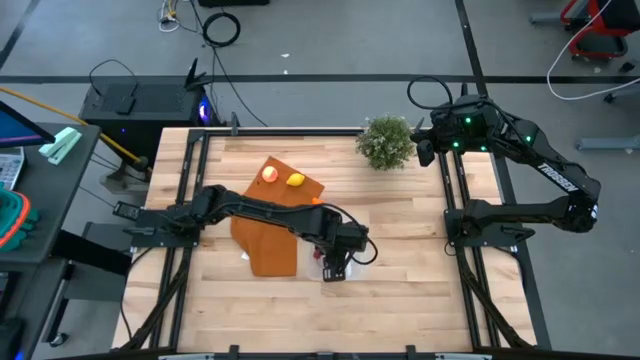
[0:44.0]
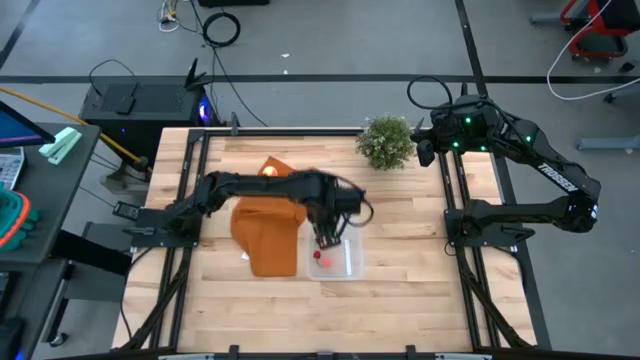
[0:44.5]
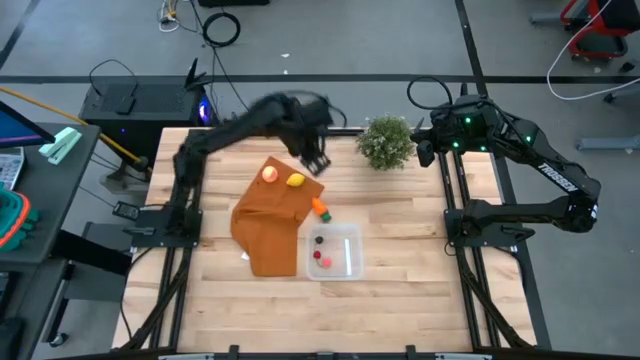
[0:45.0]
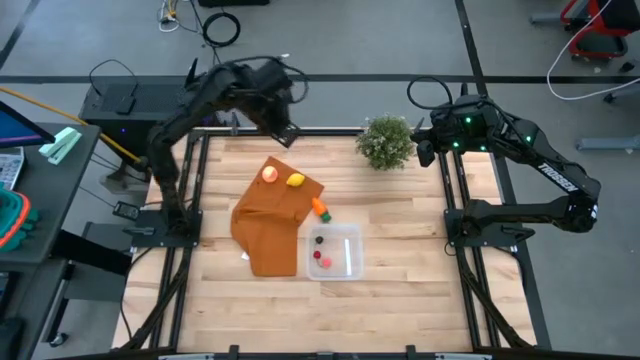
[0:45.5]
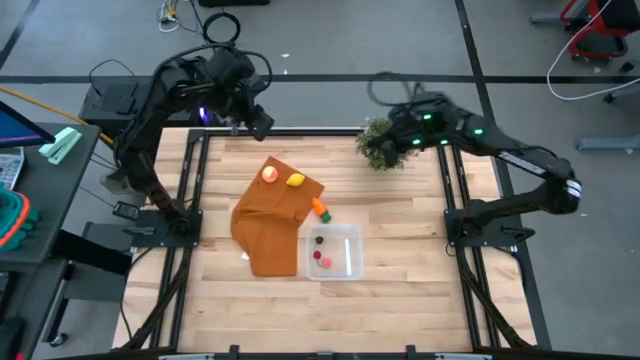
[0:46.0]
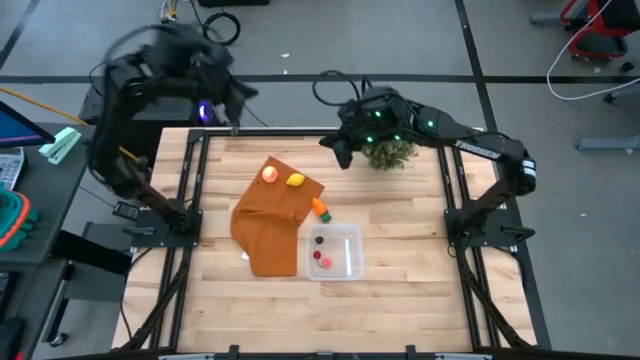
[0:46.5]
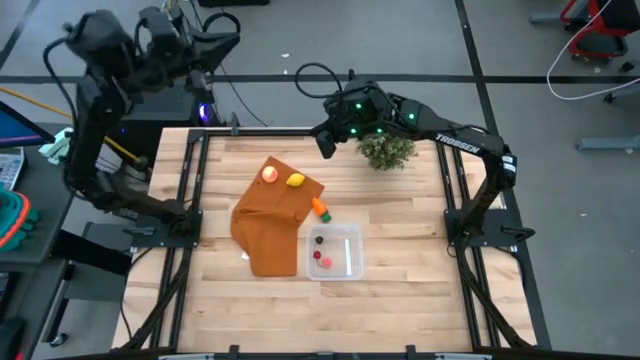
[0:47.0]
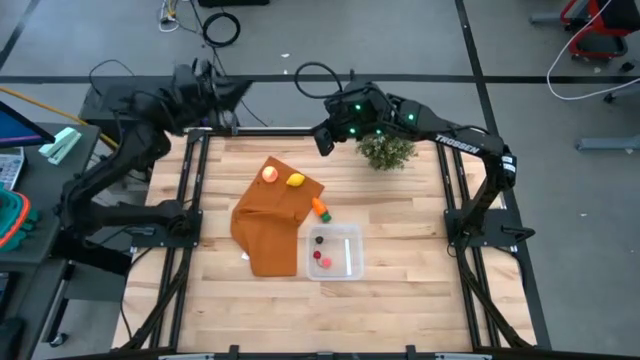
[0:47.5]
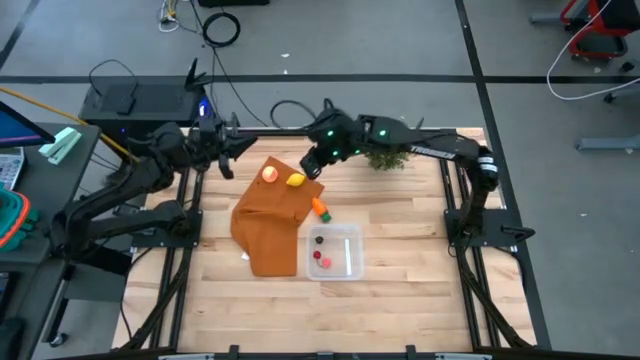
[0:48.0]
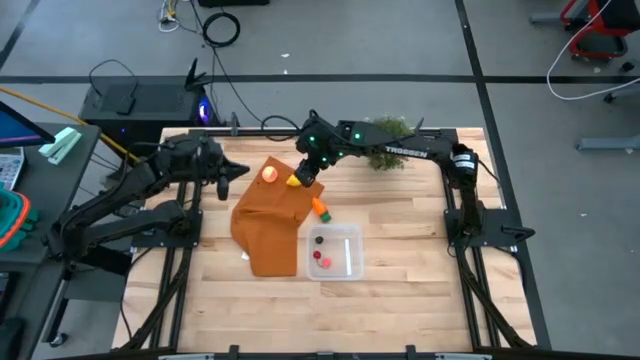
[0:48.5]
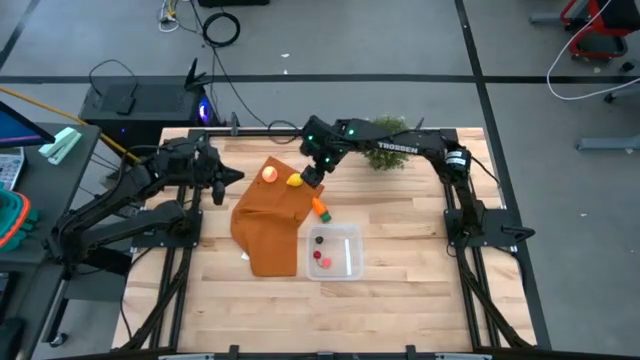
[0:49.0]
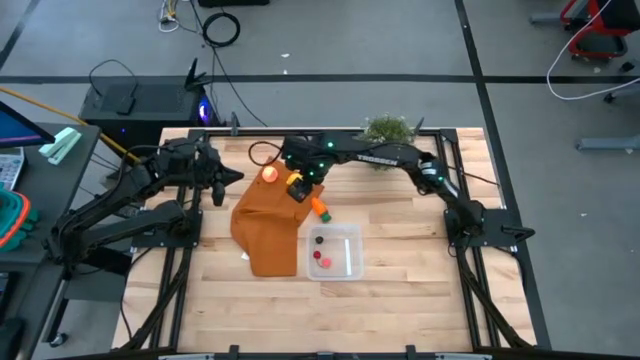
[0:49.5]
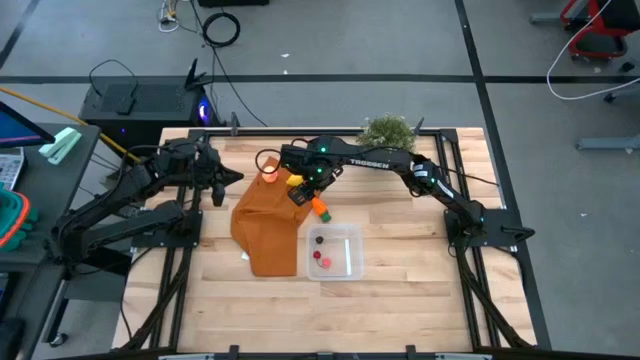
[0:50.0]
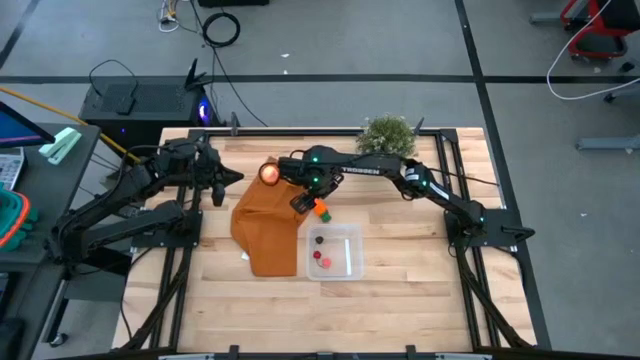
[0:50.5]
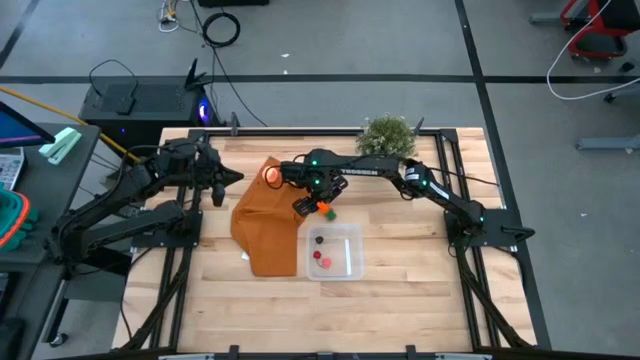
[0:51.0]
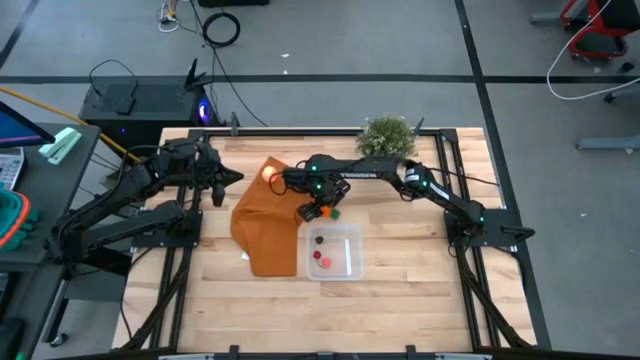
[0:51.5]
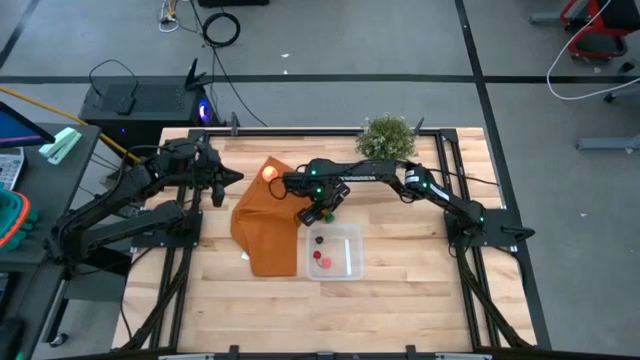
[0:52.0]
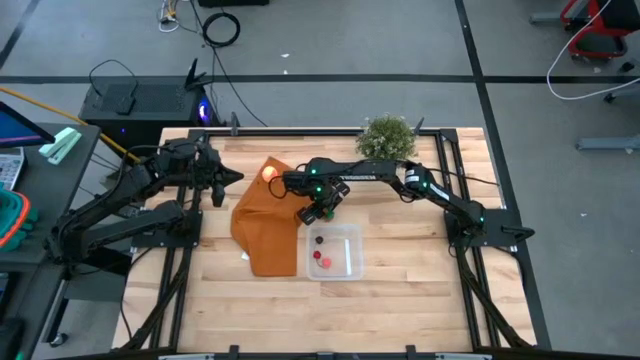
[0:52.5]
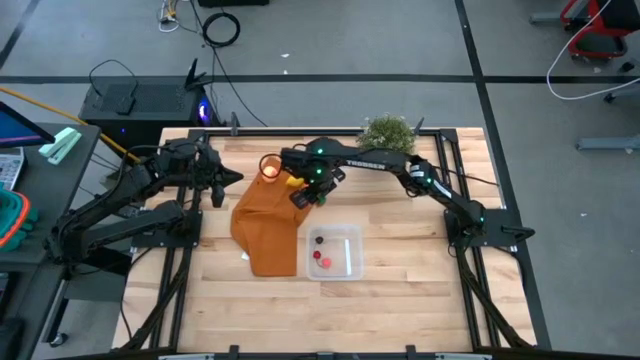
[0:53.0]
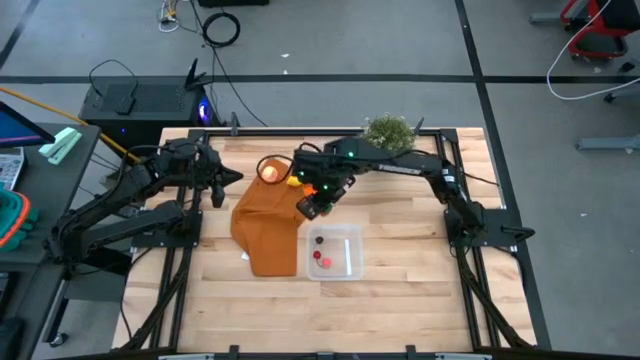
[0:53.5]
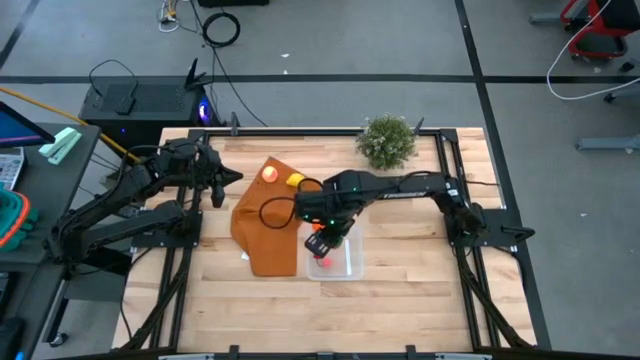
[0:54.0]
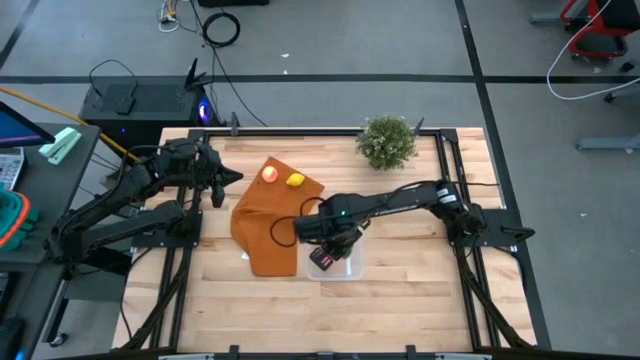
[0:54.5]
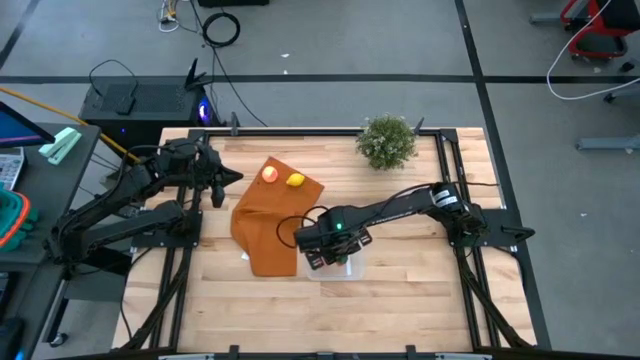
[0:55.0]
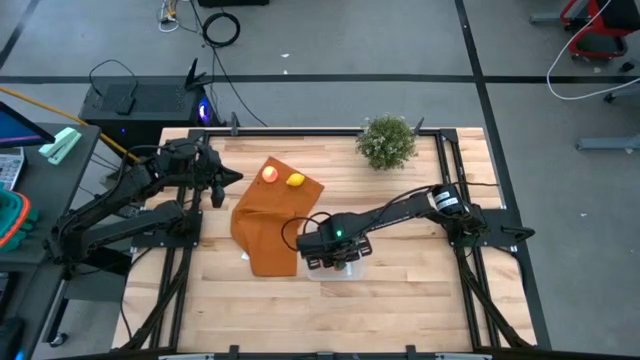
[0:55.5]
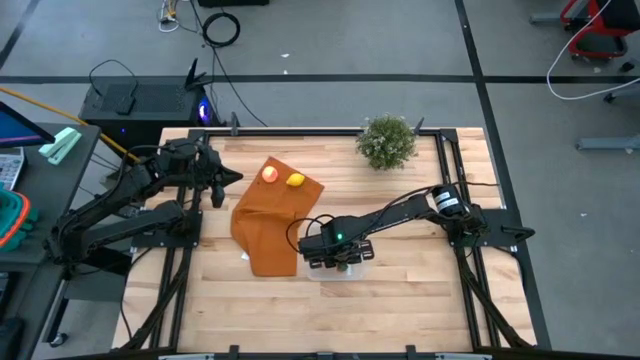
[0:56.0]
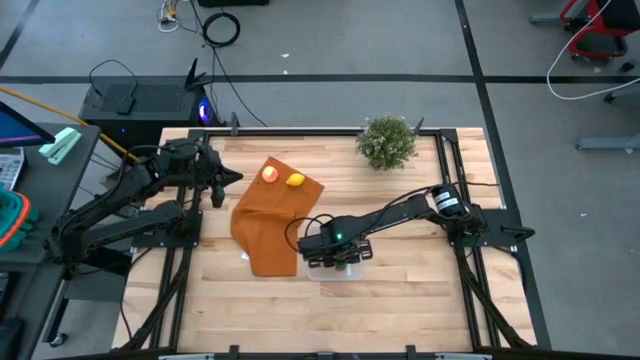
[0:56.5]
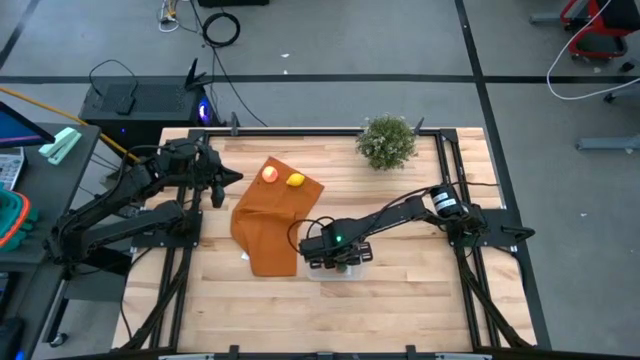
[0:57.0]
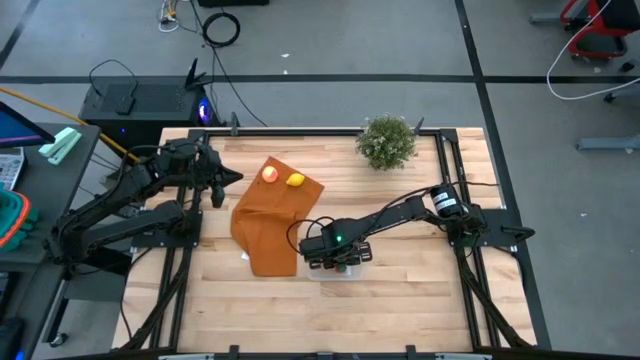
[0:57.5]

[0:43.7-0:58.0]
Task: Pick and placing Produce into tupperware
Put the carrot into the transparent bin

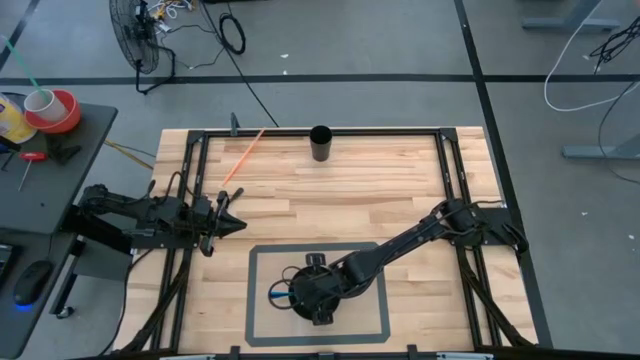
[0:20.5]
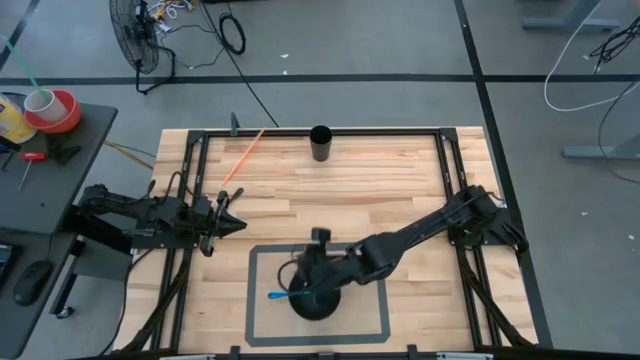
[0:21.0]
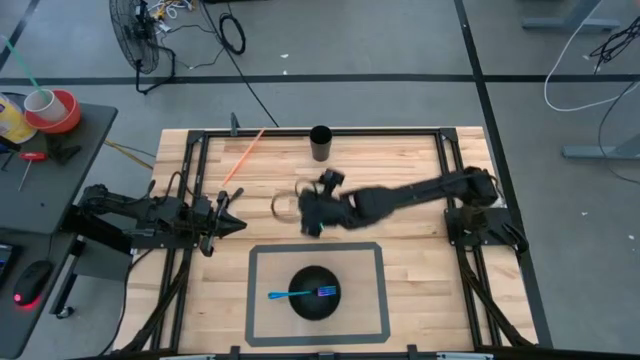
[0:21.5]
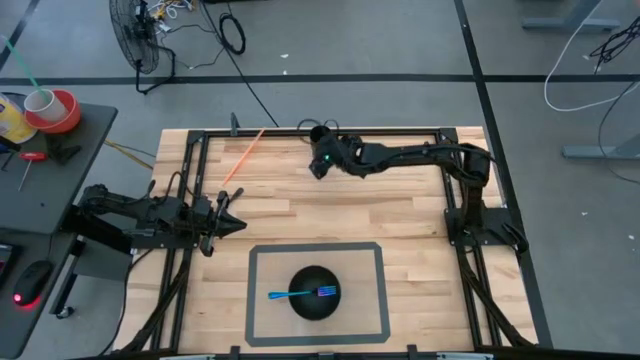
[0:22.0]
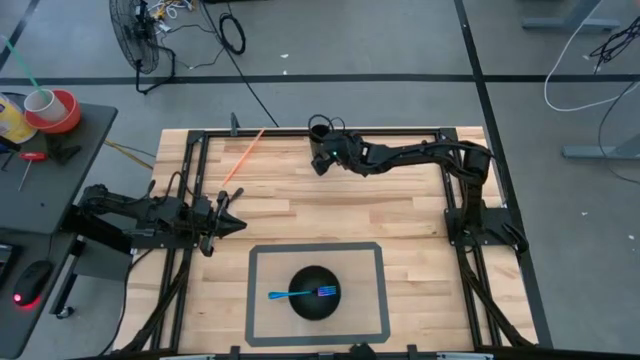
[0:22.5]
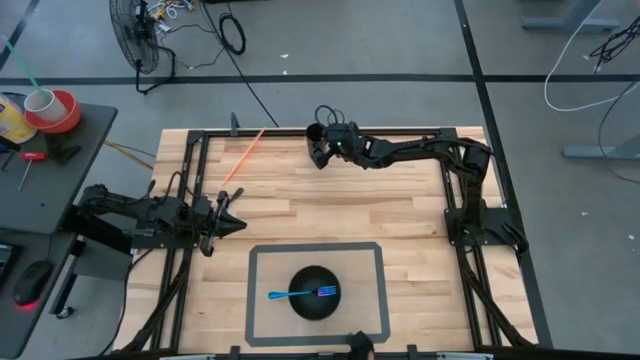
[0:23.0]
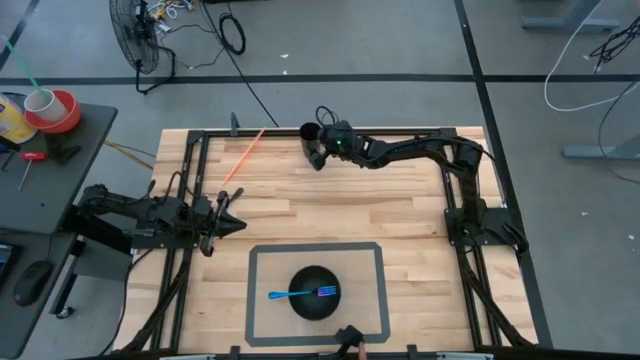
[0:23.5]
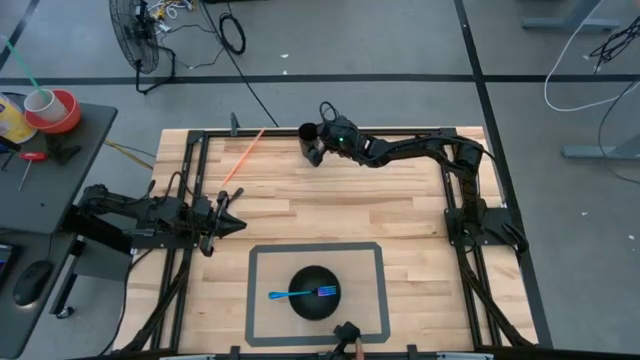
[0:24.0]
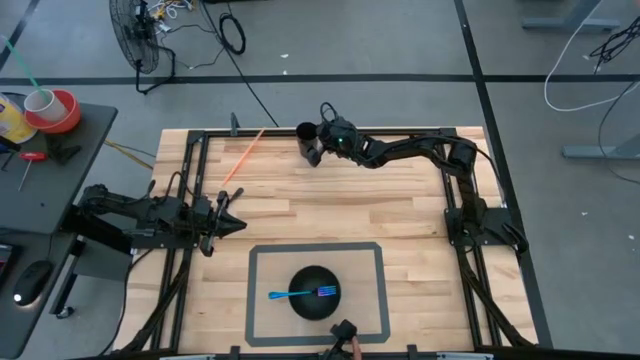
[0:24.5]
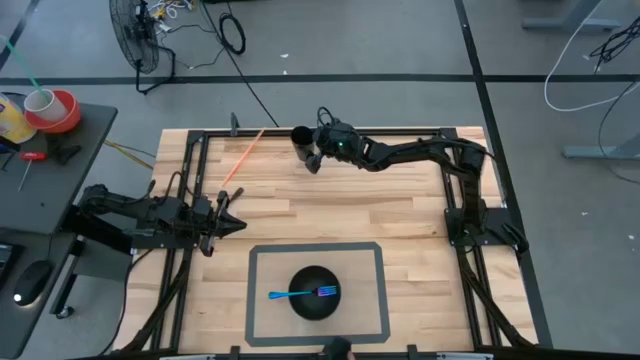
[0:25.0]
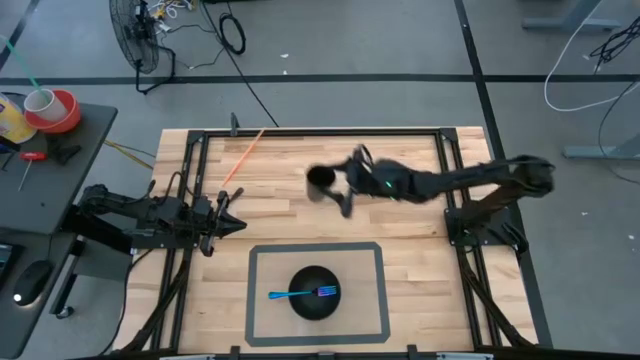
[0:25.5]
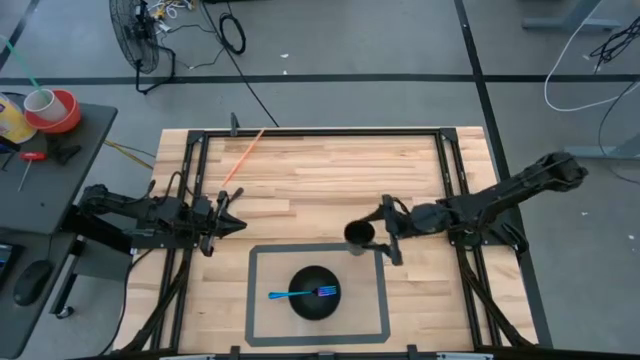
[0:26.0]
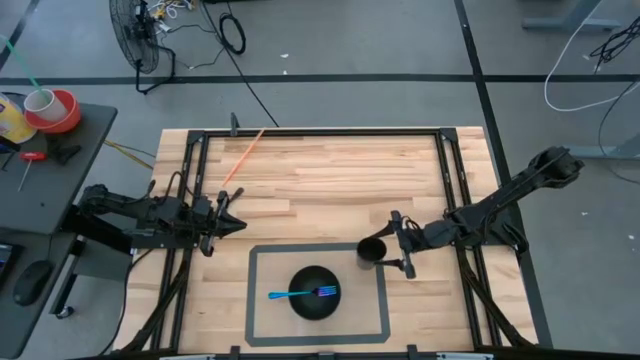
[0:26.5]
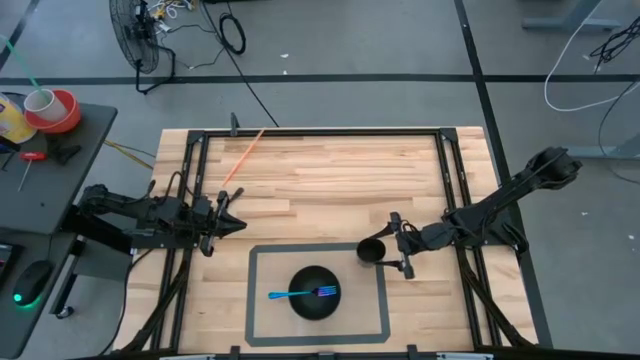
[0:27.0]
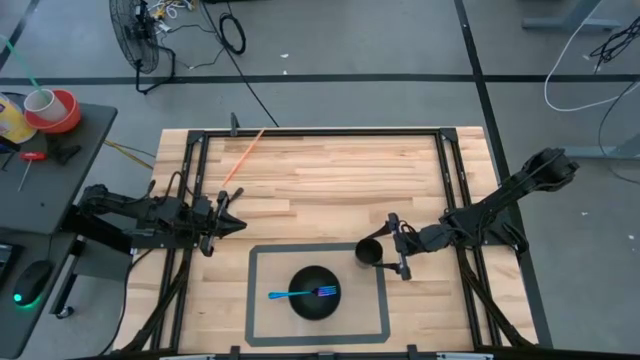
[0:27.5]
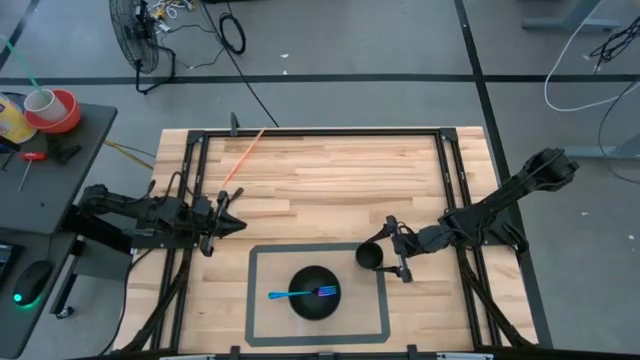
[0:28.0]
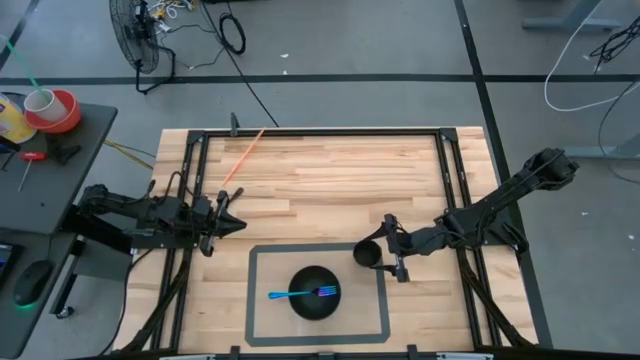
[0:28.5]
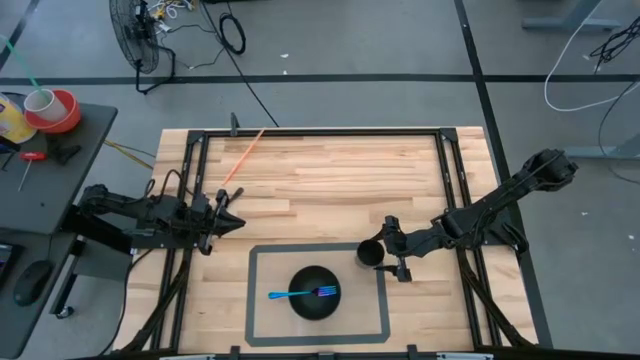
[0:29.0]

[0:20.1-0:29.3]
Task: Pick & Place Utensil
Put the black cup on the transparent mat
